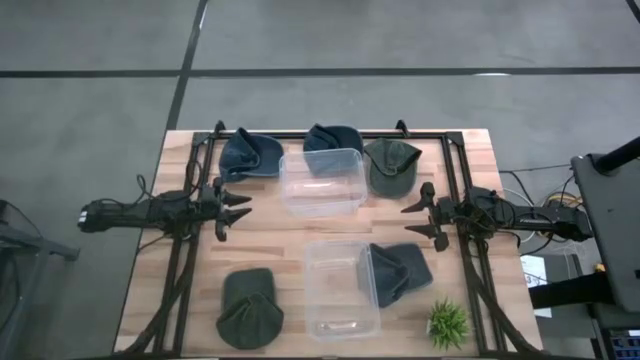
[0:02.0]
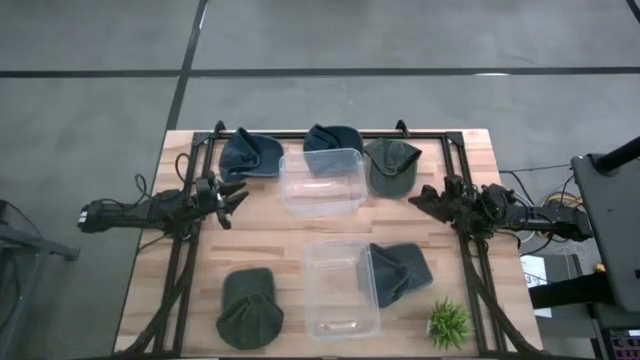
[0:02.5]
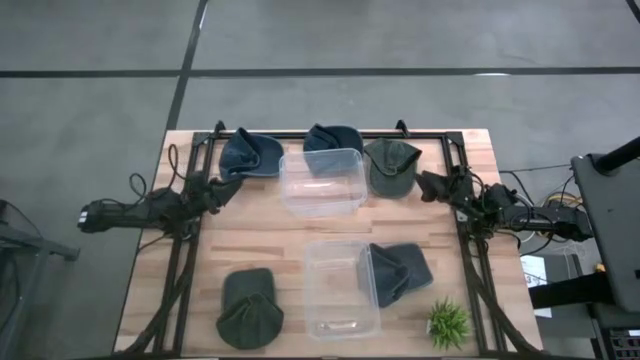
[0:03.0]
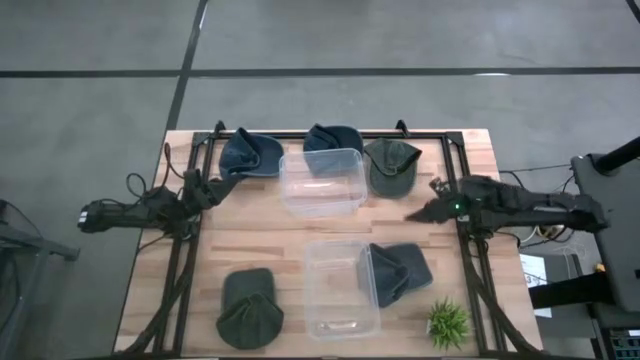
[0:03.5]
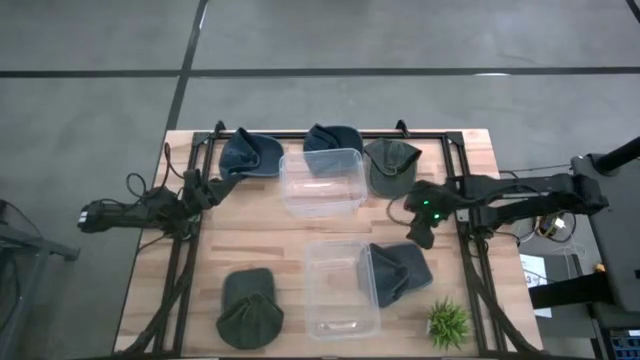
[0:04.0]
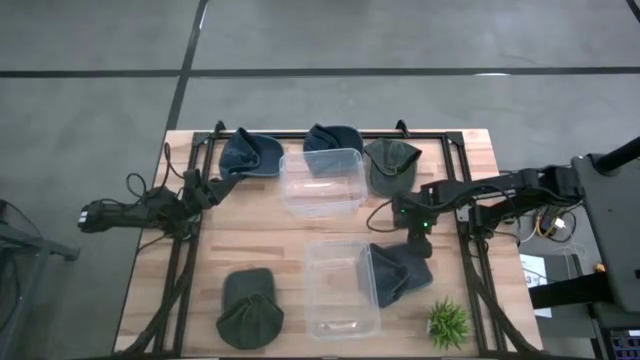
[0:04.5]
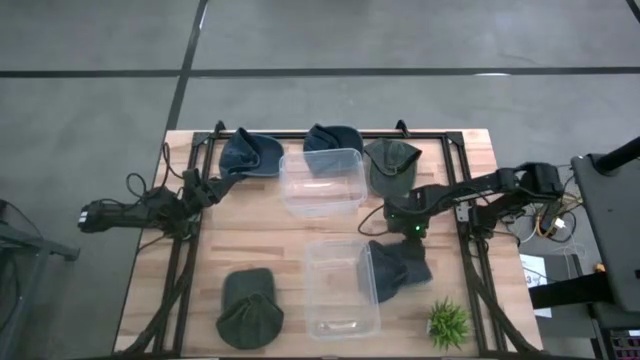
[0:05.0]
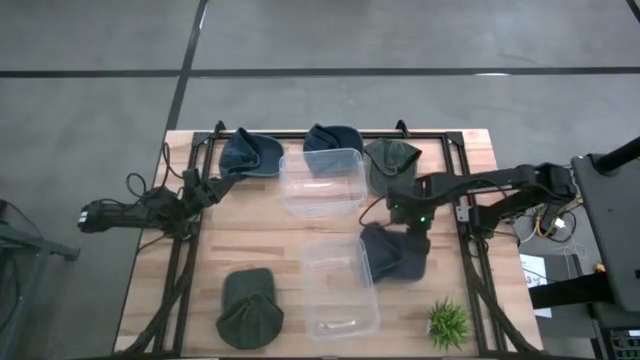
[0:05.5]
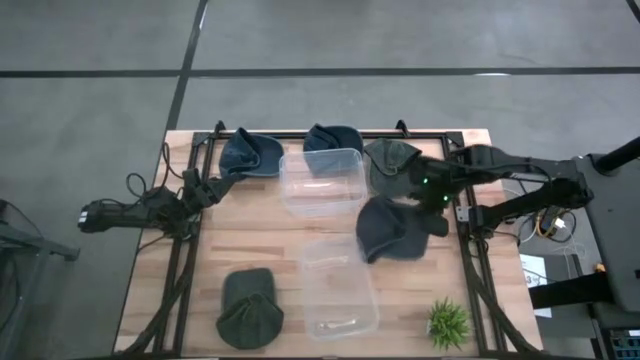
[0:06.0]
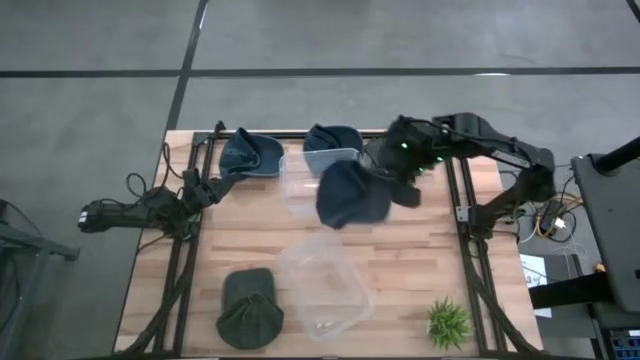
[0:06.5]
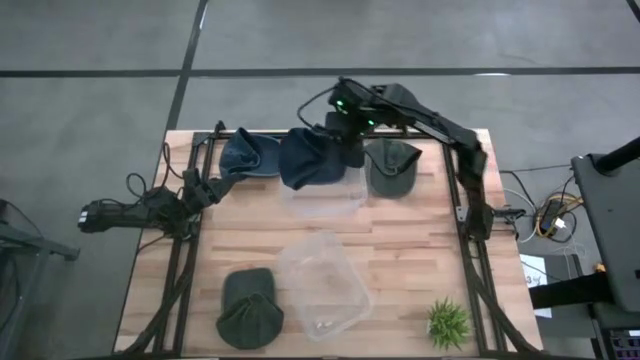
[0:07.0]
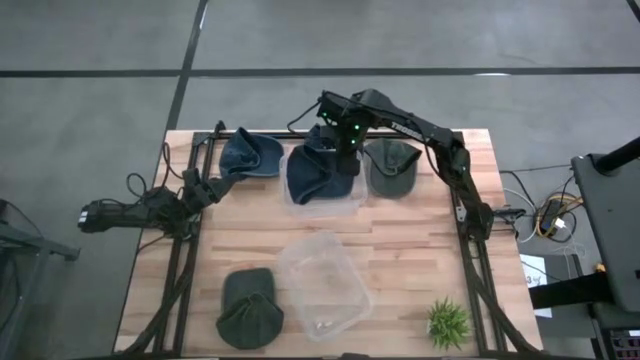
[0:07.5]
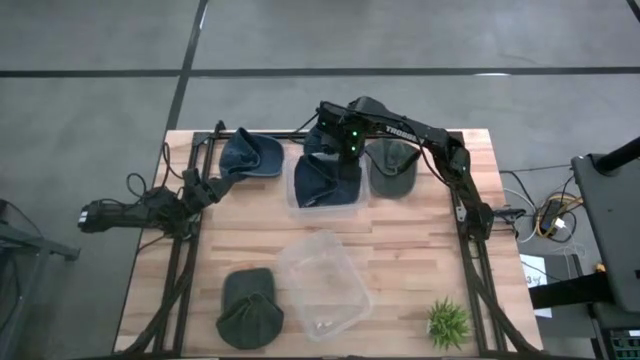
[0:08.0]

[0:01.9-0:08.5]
Task: Pick and place caps into container
Put the bottom blue cap into the top transparent container

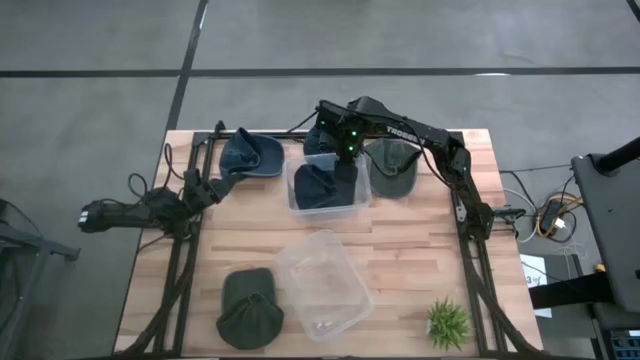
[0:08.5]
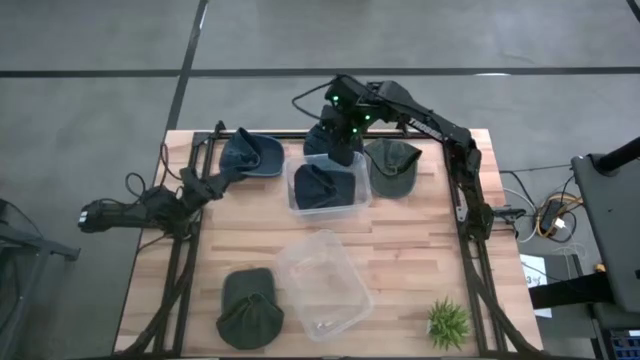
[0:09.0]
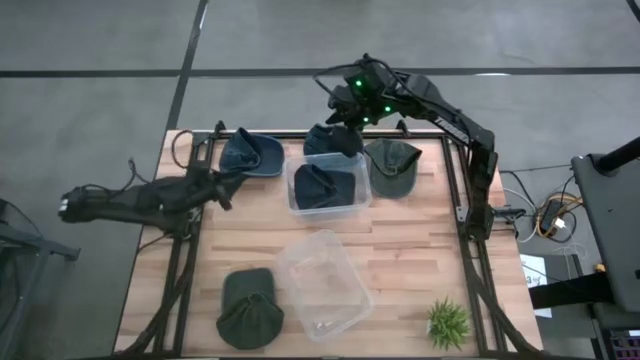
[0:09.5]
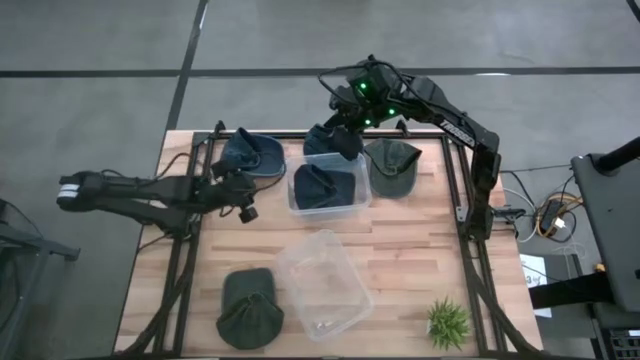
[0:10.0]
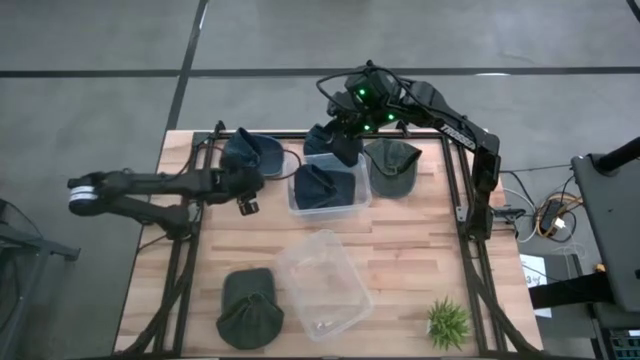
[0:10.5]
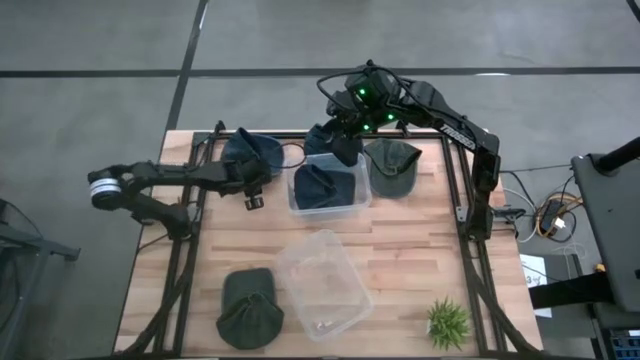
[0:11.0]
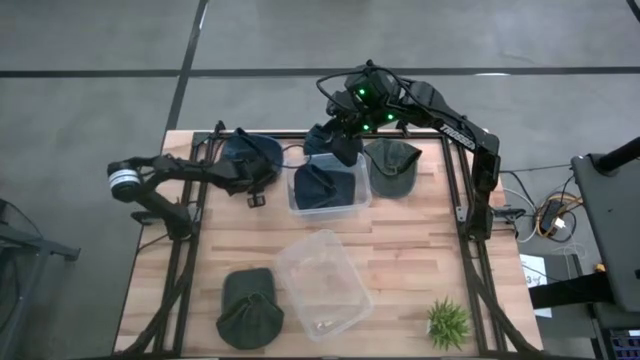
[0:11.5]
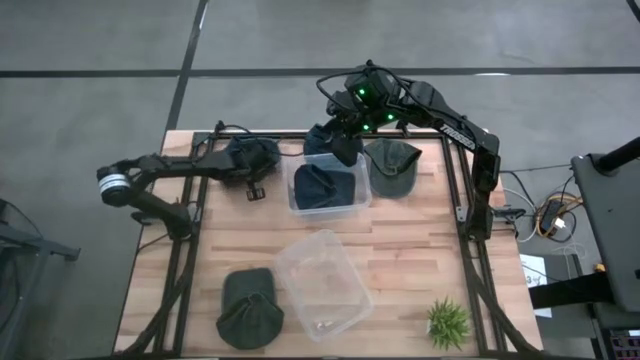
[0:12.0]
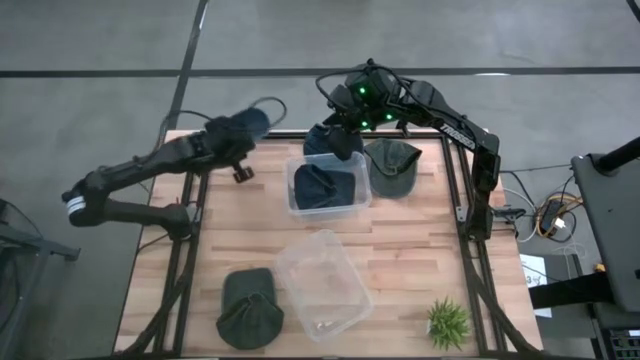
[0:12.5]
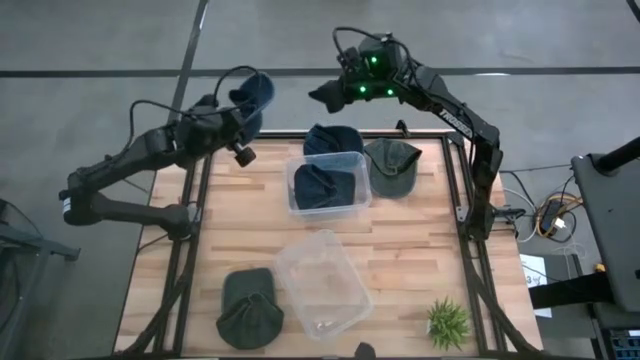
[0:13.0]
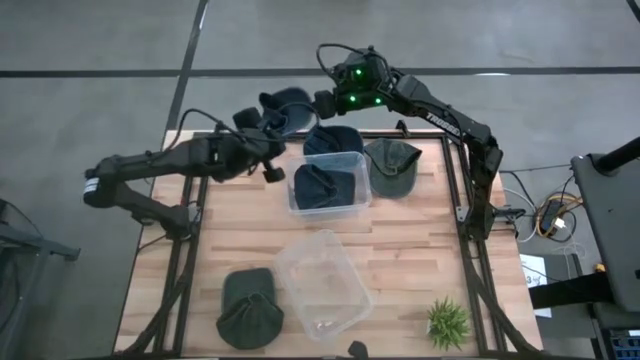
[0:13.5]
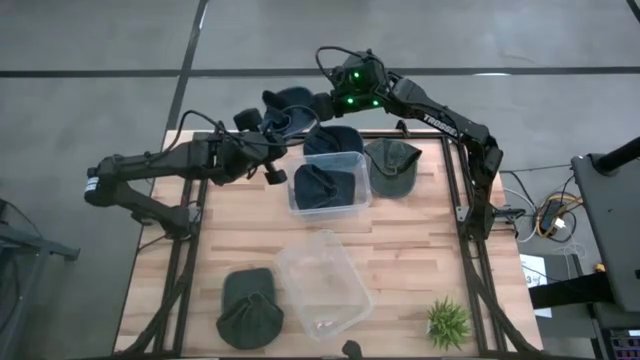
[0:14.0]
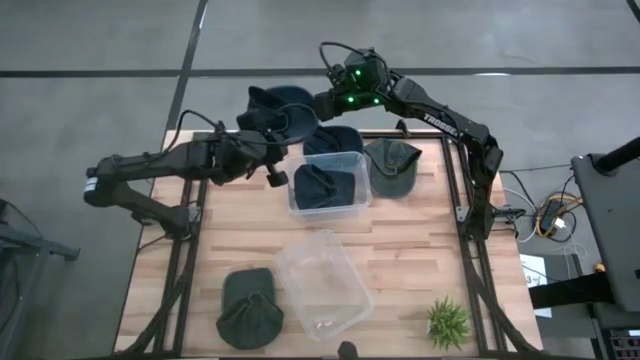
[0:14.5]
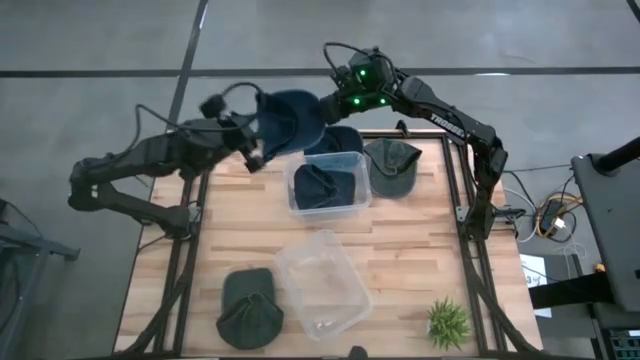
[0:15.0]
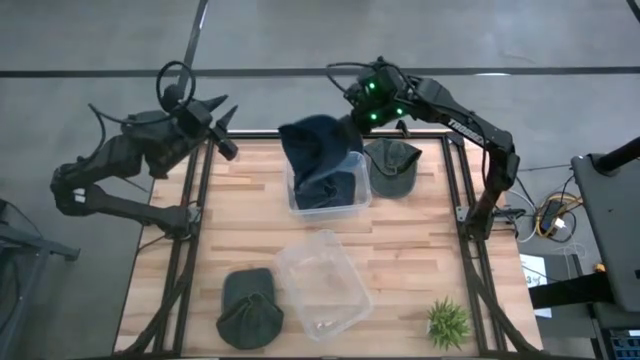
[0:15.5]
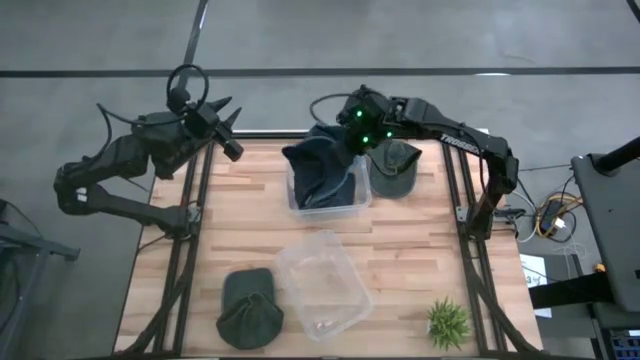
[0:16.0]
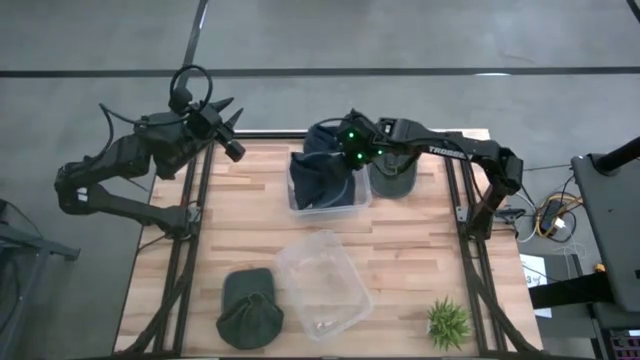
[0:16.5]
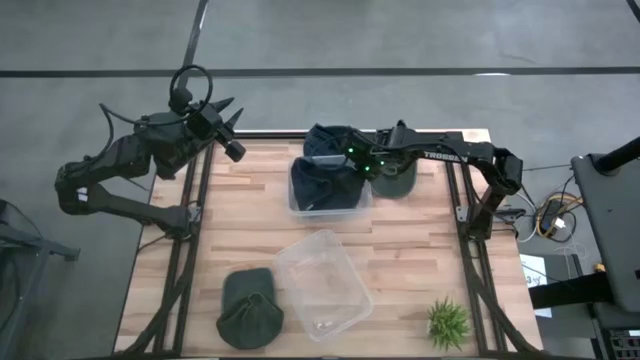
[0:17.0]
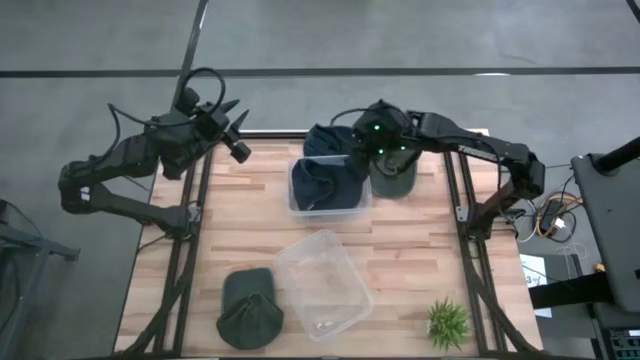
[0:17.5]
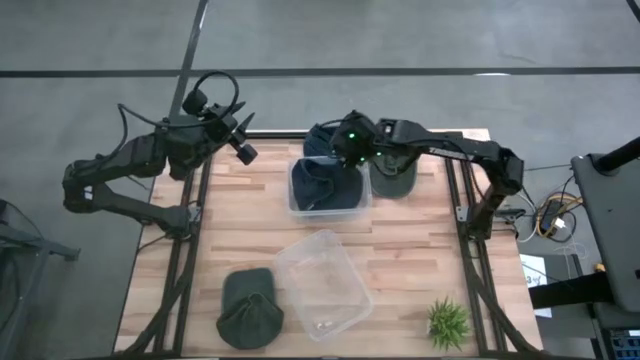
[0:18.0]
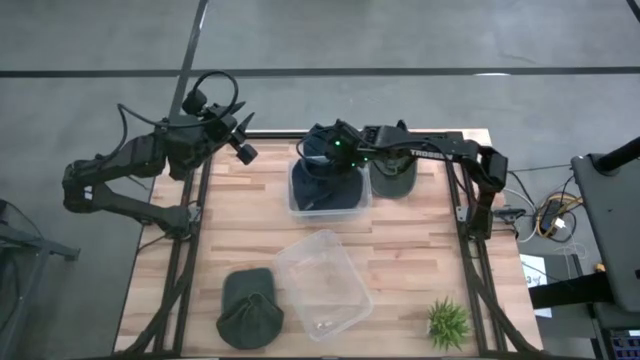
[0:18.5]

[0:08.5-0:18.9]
Put the left blue cap into the top transparent container

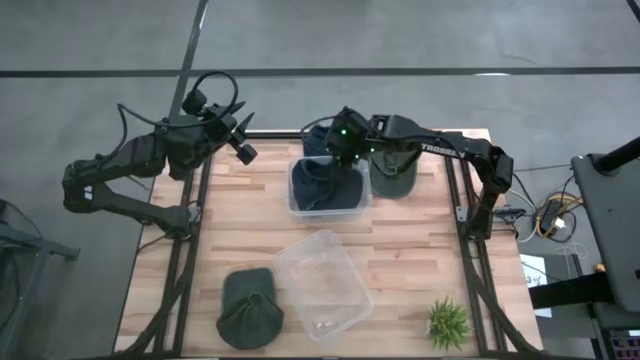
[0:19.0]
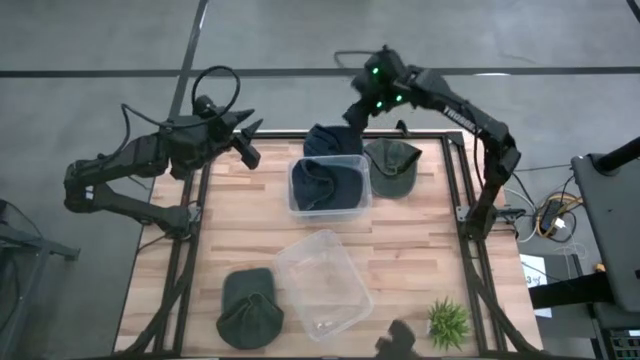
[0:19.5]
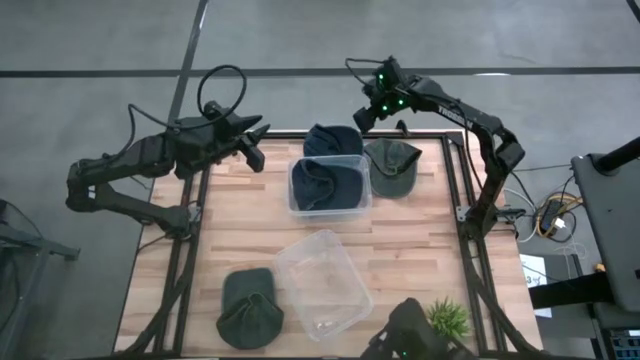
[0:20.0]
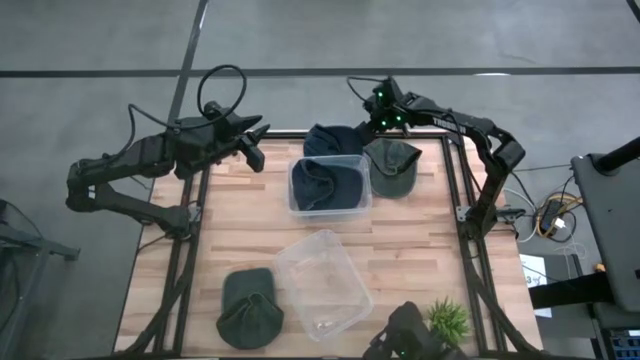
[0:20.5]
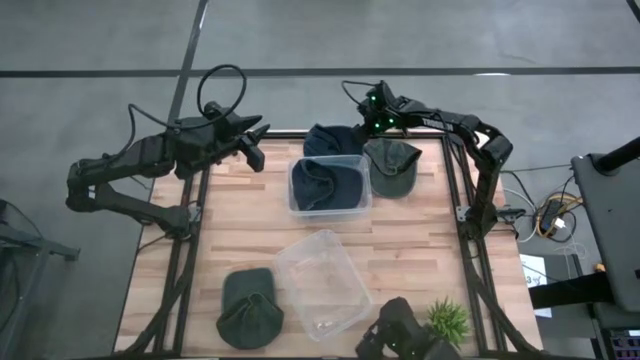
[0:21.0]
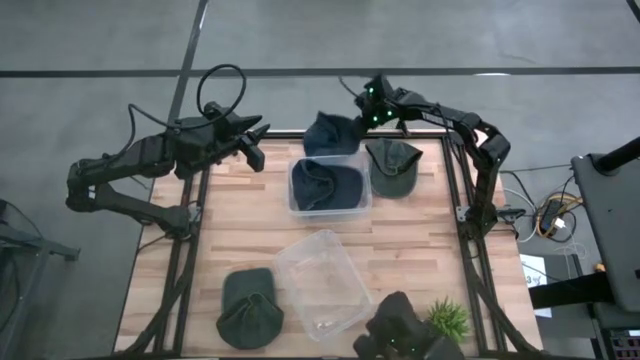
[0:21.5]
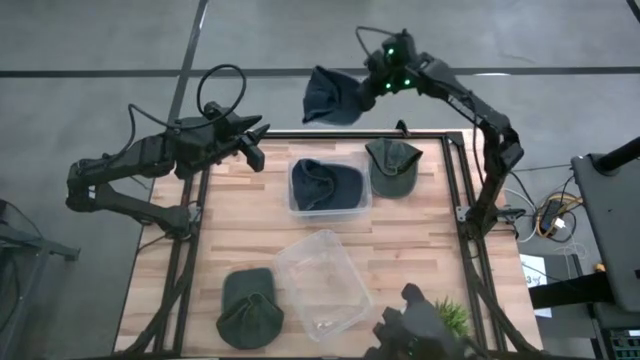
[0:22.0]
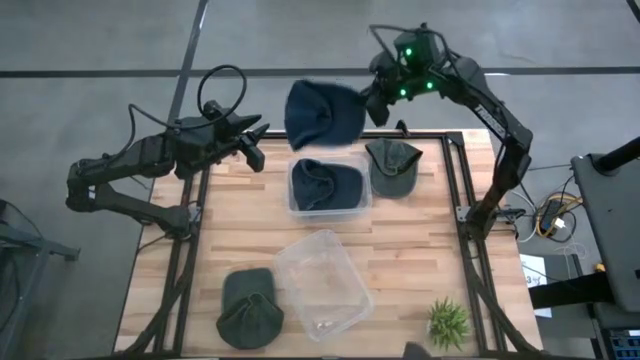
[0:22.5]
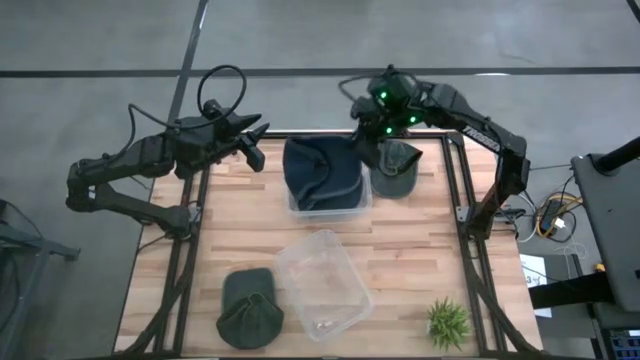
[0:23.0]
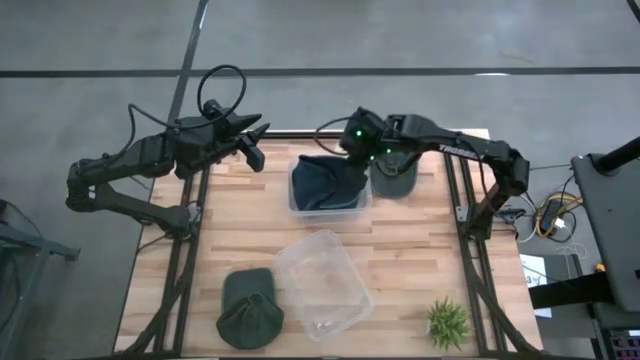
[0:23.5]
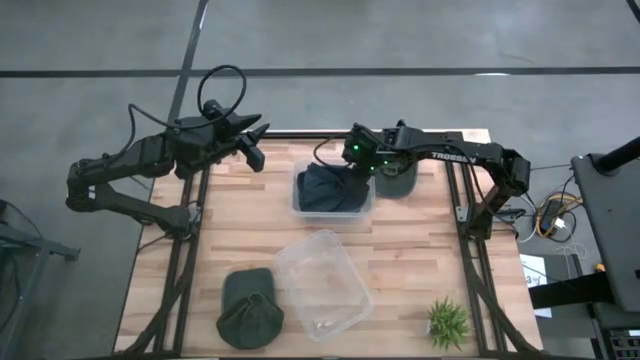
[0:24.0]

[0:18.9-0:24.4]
Put the blue cap into the top transparent container
